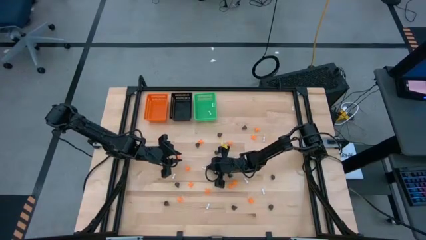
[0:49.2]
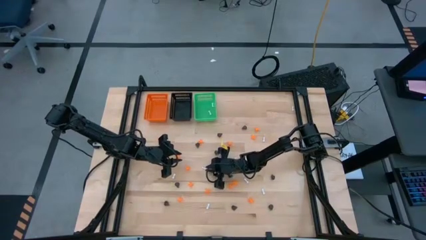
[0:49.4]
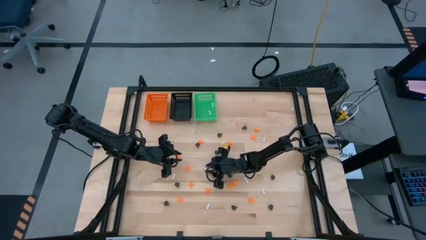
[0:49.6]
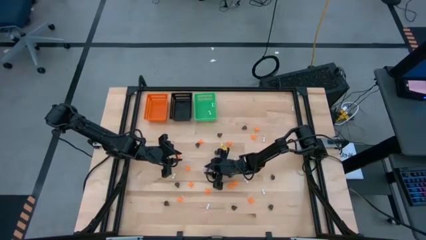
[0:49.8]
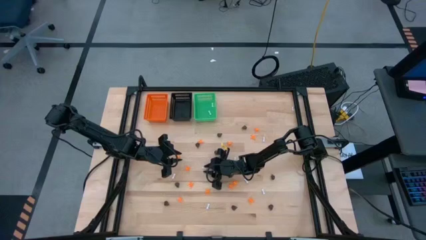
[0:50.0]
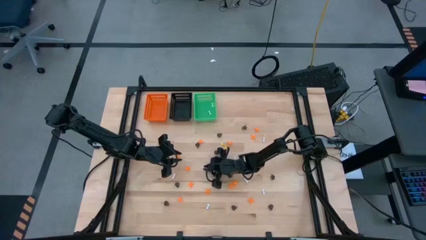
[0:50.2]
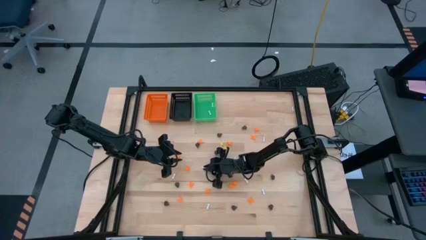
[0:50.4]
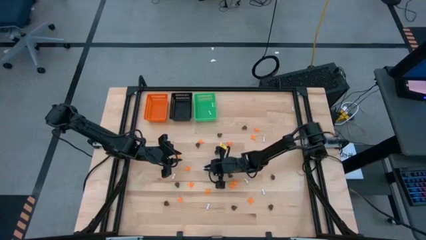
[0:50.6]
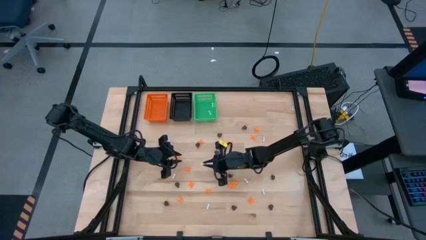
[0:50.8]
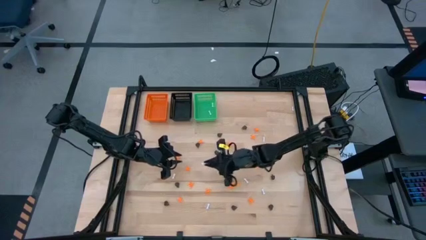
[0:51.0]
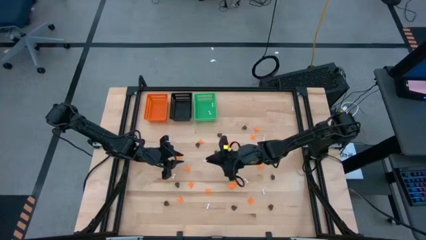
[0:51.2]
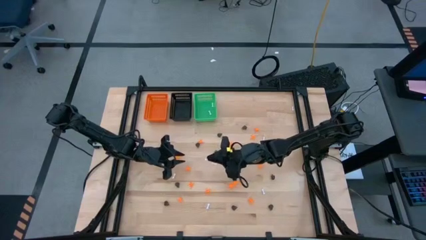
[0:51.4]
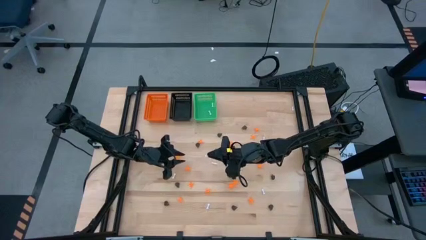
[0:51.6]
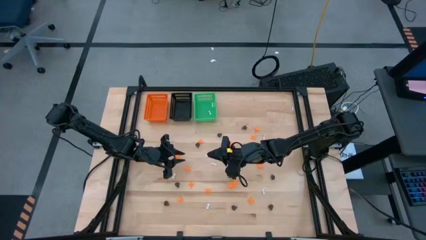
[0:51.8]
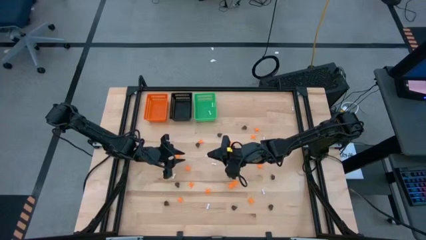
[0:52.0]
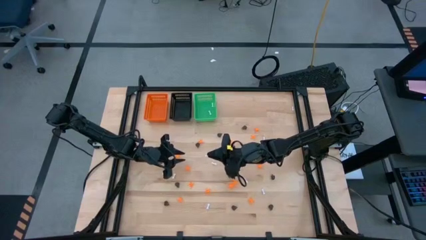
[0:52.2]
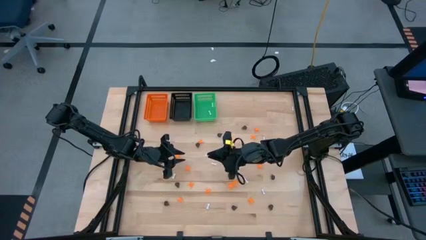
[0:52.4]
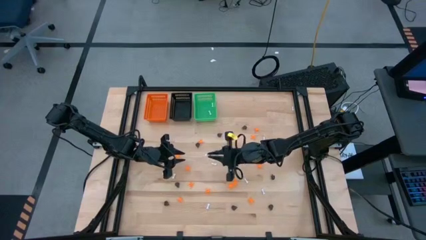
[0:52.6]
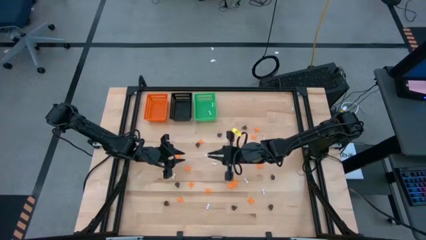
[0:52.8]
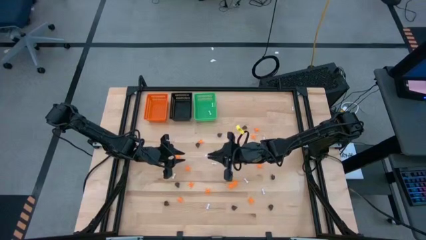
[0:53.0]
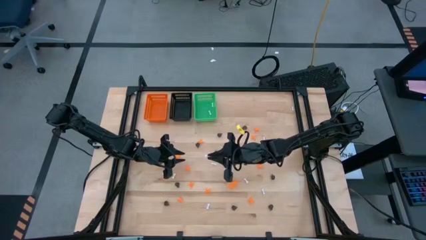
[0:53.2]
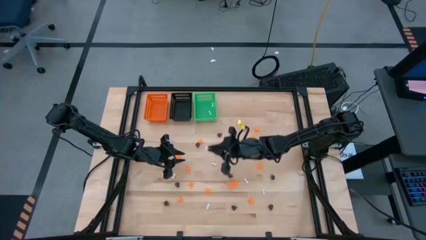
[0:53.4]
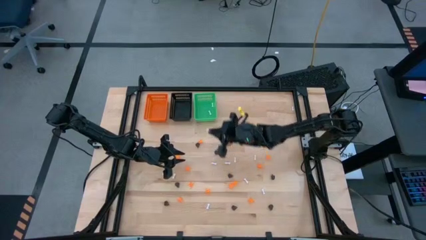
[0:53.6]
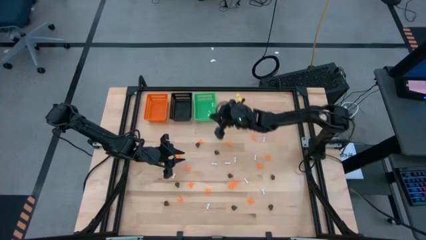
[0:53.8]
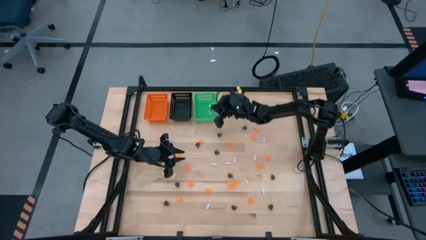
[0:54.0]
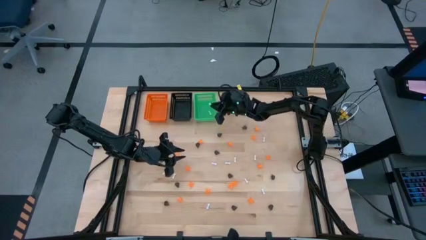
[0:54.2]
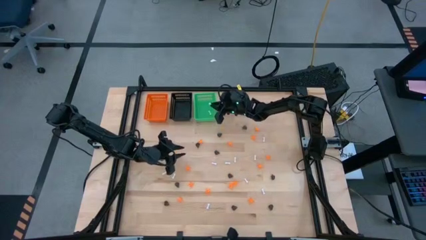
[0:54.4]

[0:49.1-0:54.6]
Task: Sort Halloween decoration
Put the white bone toy into the green bin

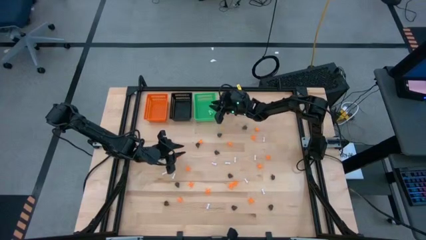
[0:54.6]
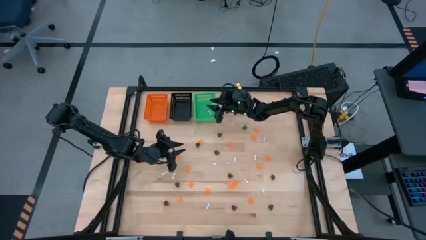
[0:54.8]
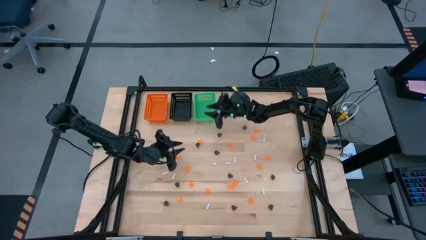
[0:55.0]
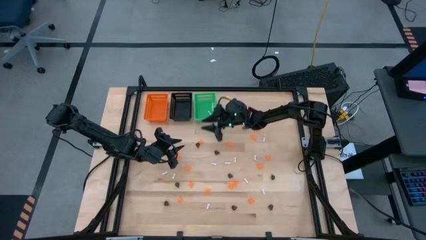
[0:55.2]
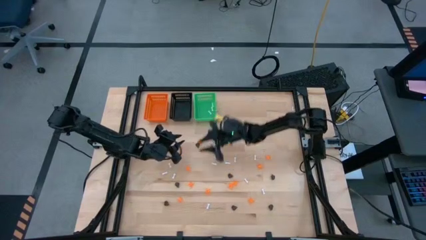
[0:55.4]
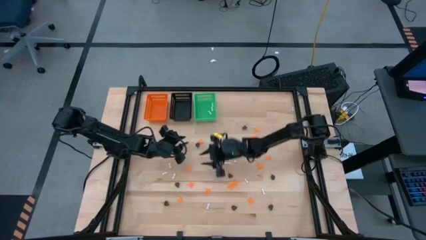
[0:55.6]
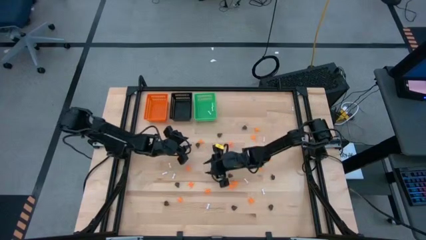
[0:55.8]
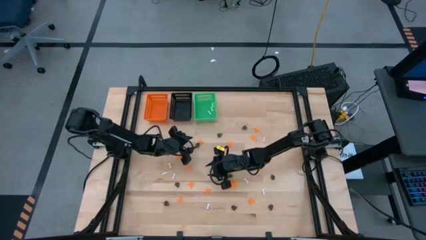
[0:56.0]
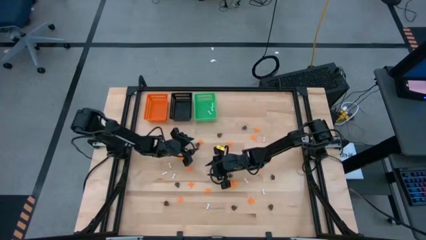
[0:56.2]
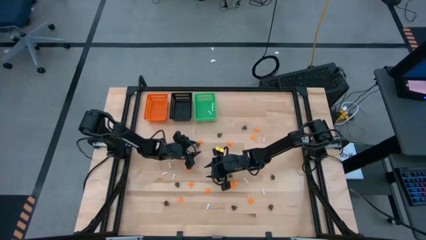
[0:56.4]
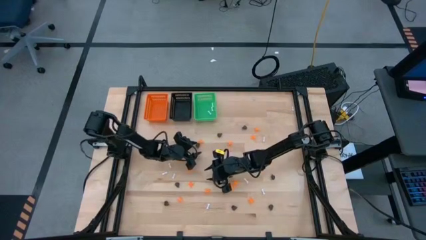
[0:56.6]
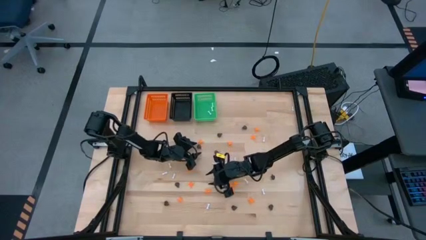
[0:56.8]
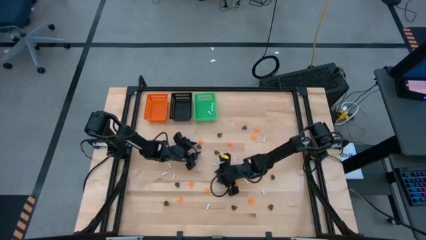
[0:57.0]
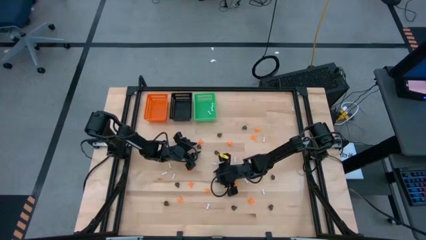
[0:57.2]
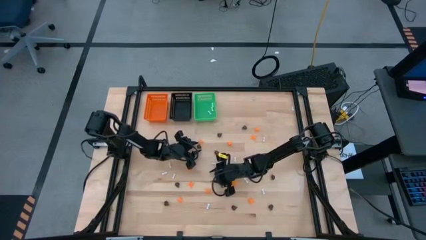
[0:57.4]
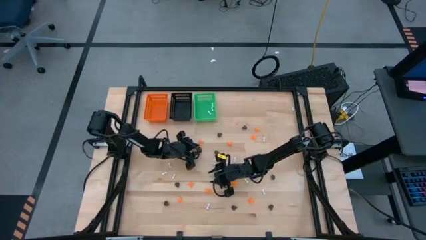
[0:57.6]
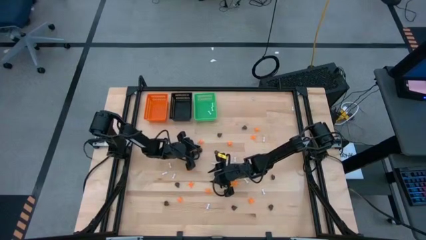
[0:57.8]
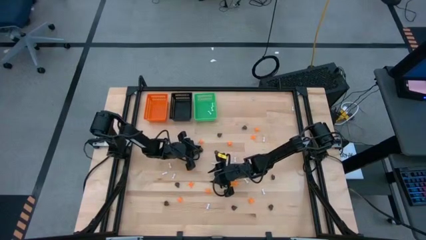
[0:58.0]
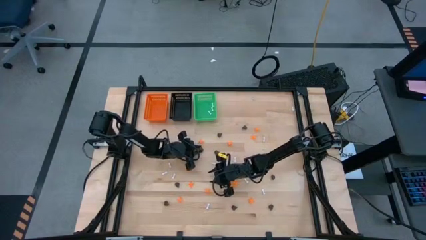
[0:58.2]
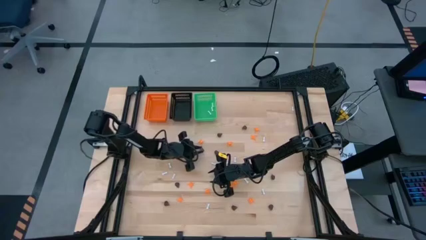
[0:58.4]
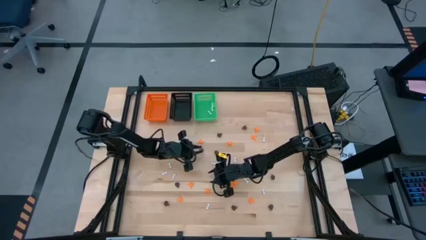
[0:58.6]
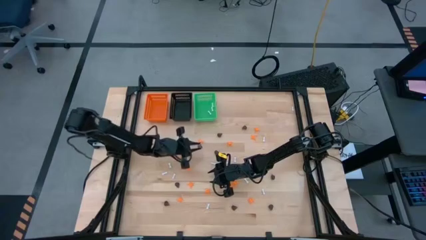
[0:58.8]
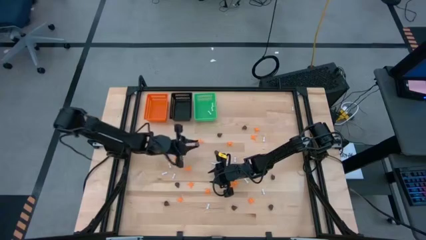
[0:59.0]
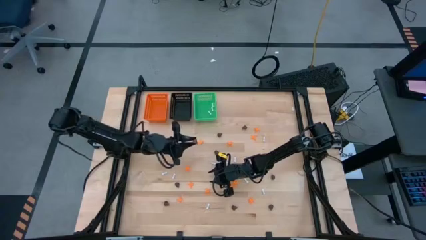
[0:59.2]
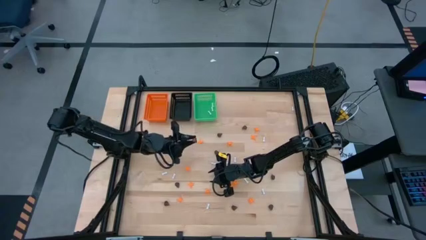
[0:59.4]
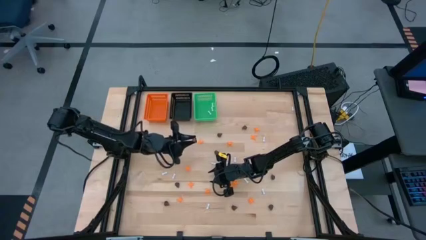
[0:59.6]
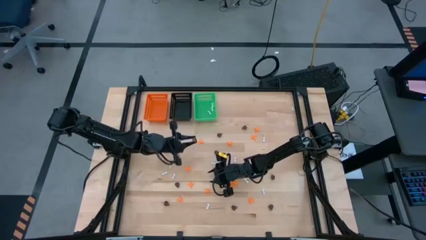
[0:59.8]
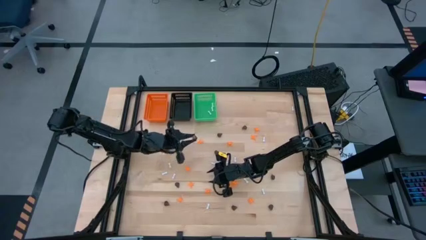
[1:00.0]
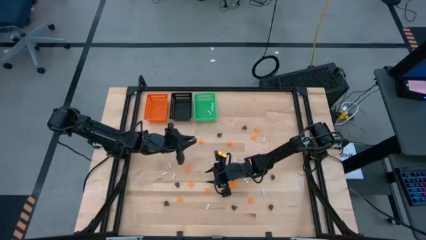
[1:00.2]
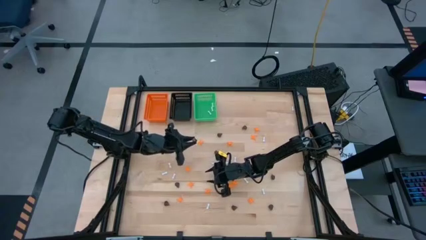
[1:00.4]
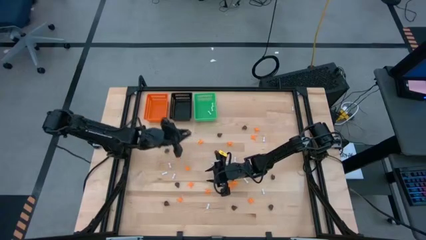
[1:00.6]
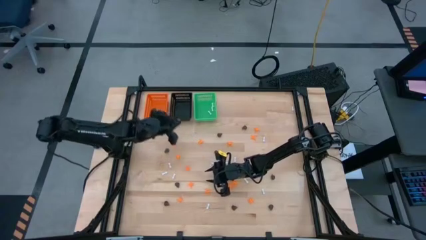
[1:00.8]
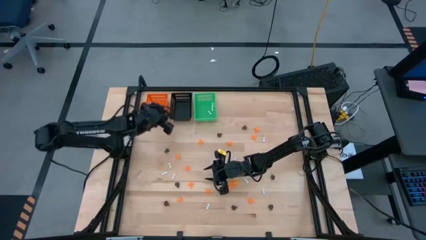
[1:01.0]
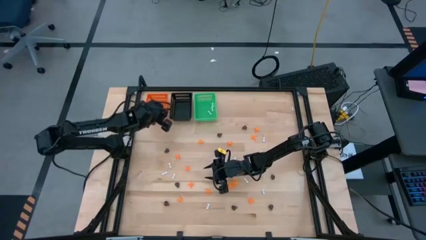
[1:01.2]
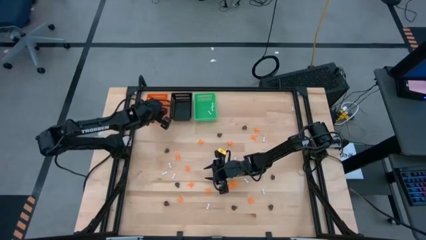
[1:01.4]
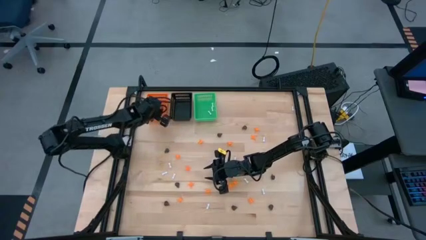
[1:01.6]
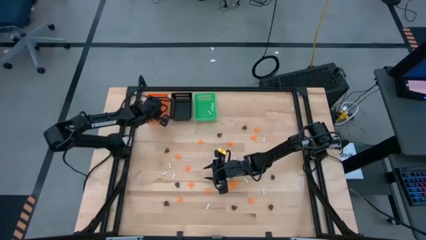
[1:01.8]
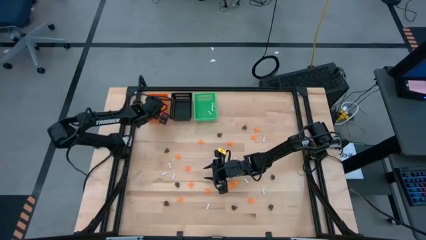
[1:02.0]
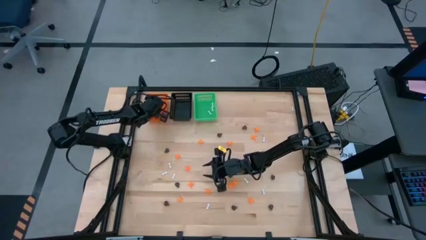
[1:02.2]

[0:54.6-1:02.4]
Put the black skull toy into the orange bin
